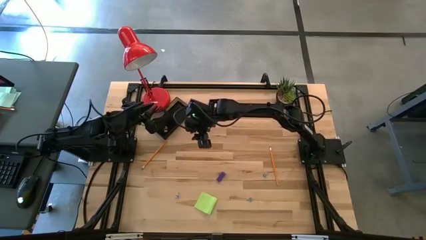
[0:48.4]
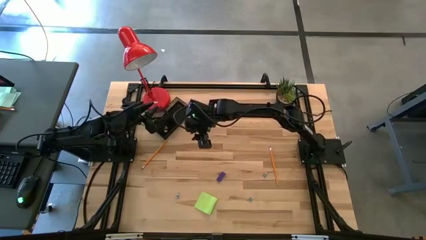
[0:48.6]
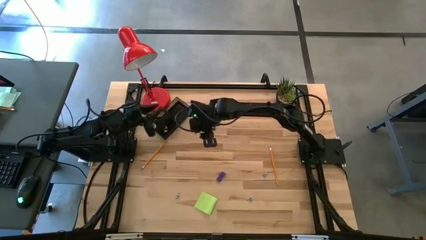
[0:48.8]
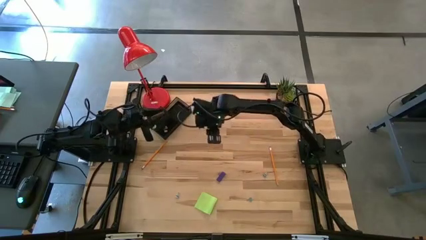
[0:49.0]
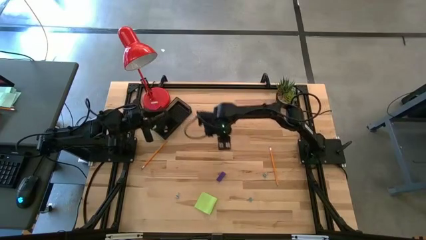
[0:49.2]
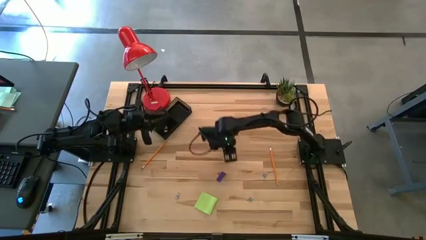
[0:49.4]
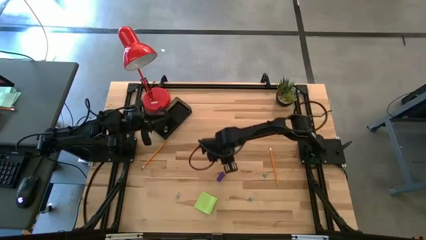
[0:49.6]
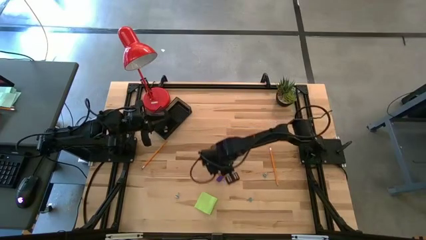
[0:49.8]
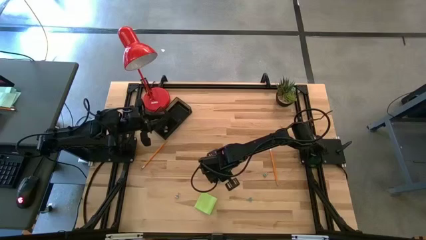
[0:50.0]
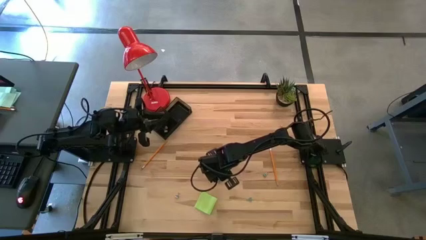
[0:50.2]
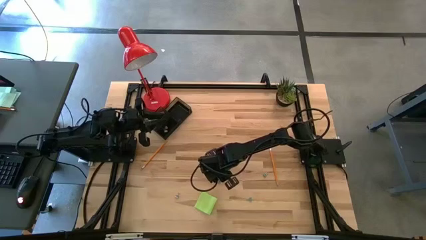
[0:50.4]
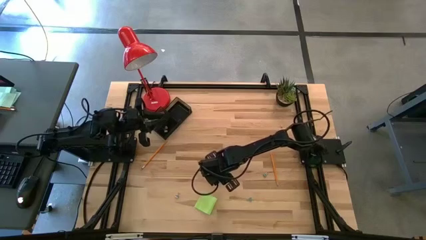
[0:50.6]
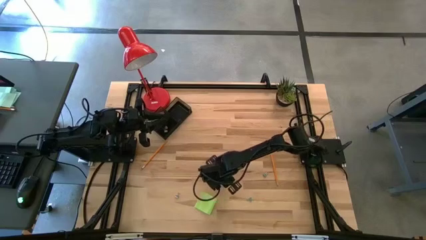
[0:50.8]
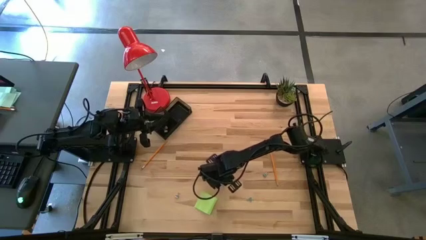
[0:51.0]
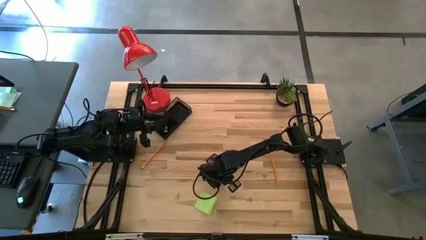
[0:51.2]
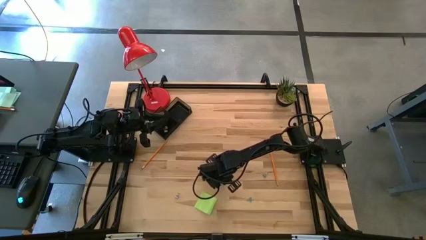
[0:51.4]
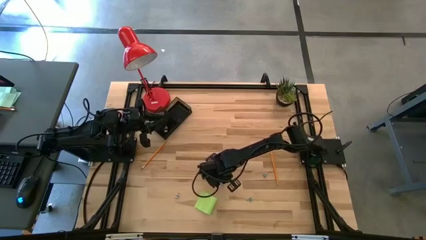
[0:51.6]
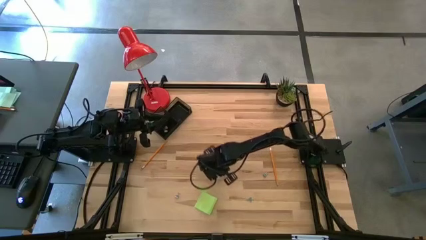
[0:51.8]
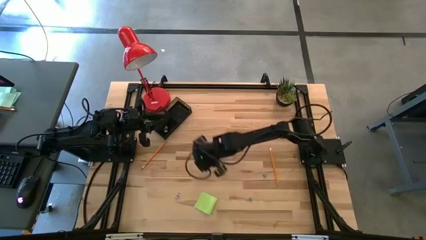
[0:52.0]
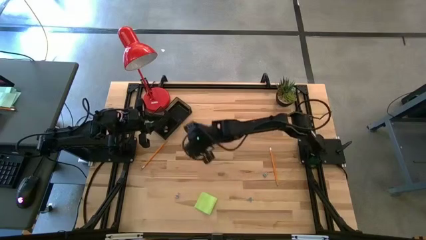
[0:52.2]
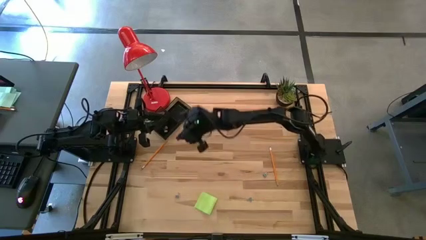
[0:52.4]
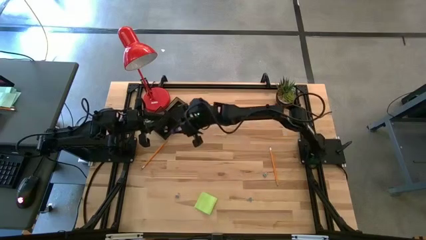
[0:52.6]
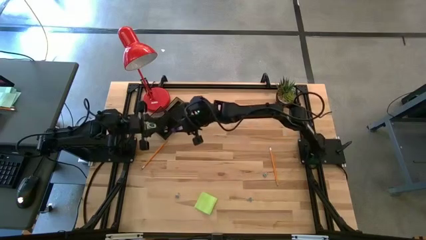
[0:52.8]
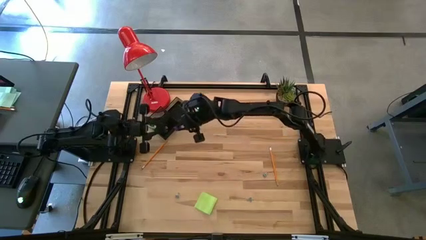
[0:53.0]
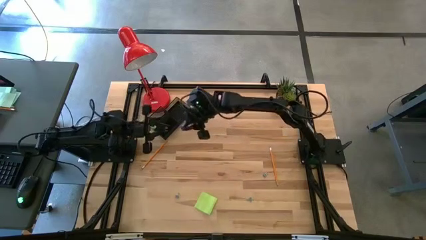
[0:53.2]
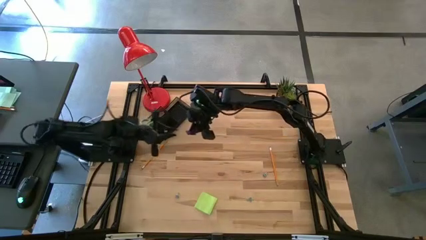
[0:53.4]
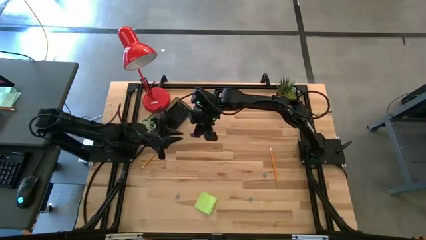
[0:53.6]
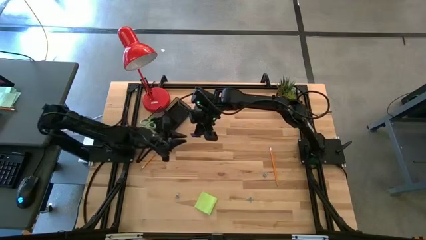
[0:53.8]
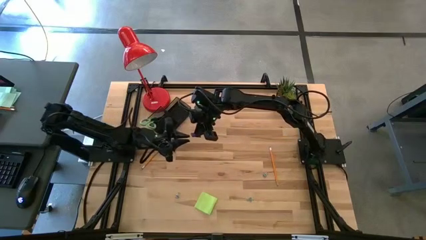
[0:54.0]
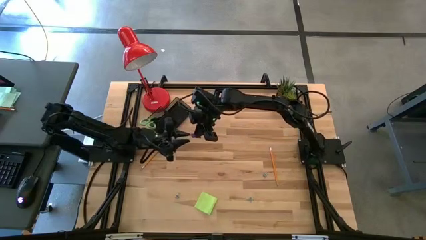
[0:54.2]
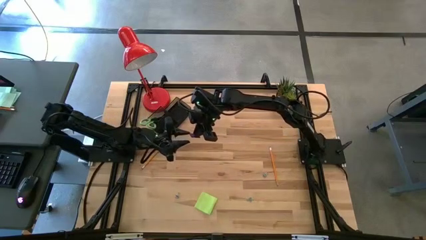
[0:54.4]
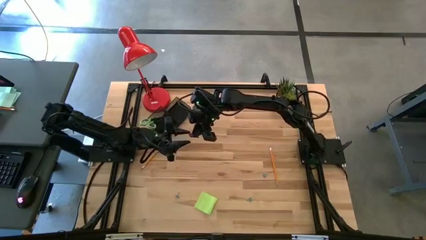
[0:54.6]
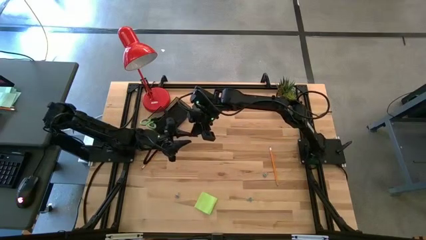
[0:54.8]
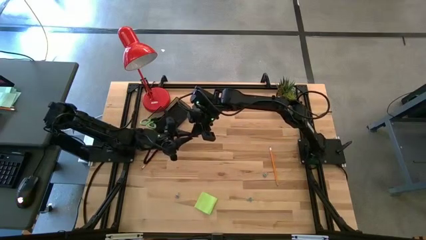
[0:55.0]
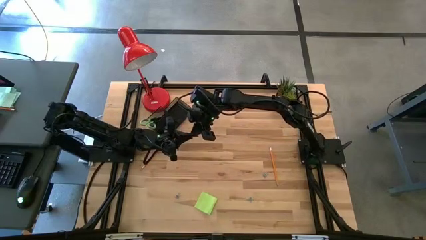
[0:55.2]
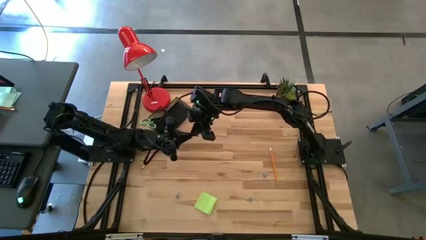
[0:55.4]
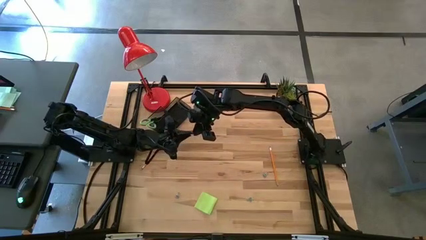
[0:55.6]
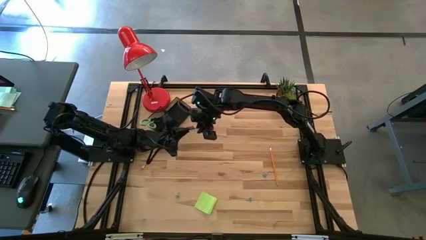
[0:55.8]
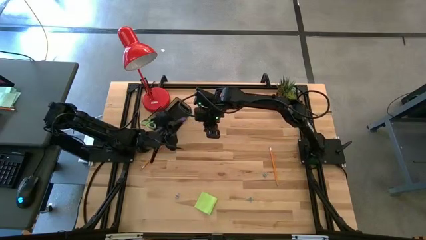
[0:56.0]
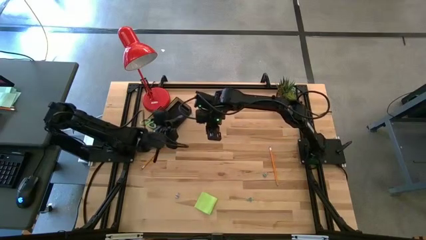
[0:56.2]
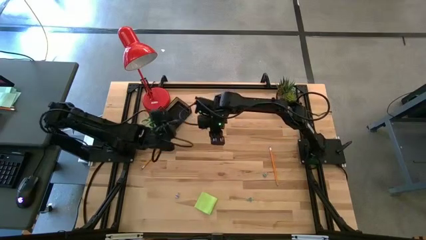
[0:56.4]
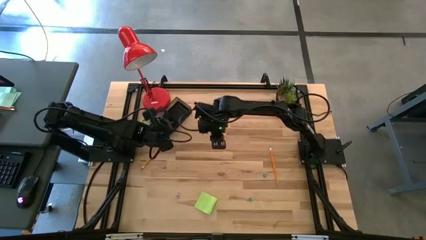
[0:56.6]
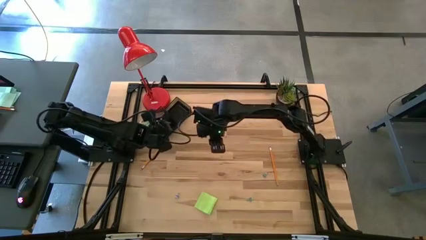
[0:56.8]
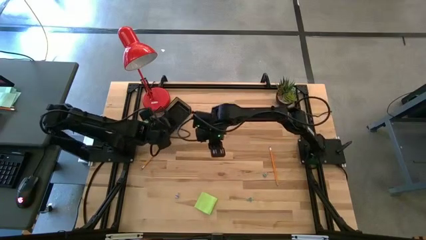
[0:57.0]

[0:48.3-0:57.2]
Task: Pick and place office supplies into organizer
Put the blue eraser into the desk organizer

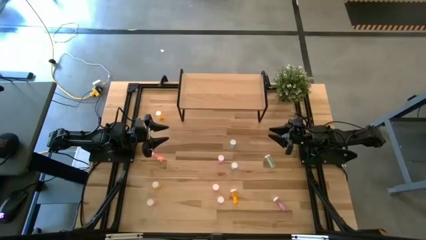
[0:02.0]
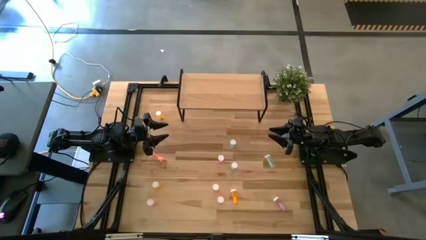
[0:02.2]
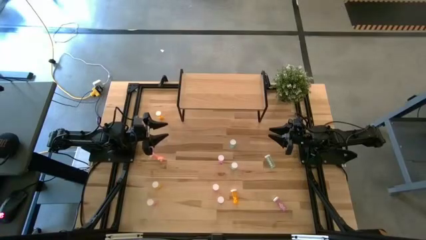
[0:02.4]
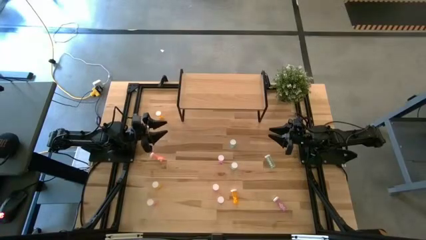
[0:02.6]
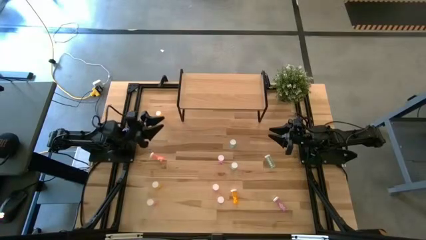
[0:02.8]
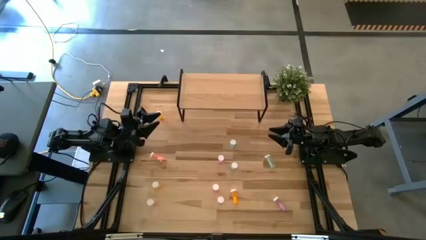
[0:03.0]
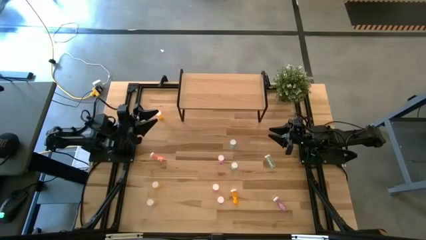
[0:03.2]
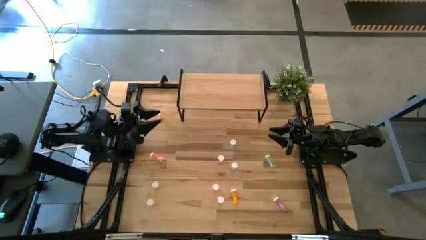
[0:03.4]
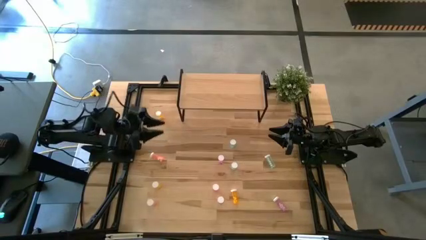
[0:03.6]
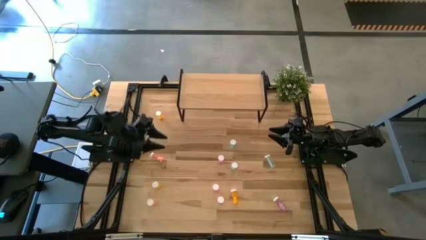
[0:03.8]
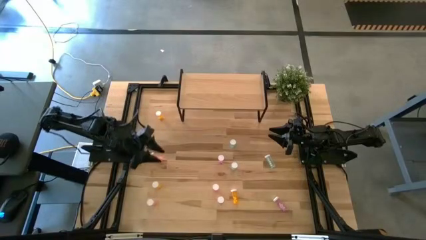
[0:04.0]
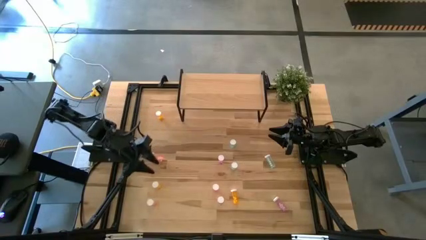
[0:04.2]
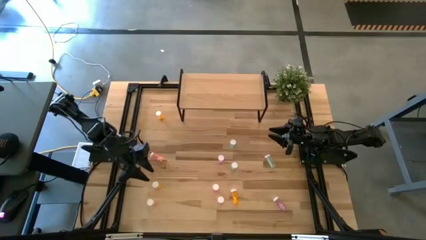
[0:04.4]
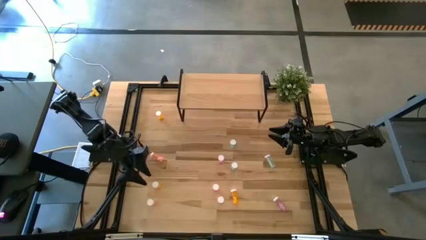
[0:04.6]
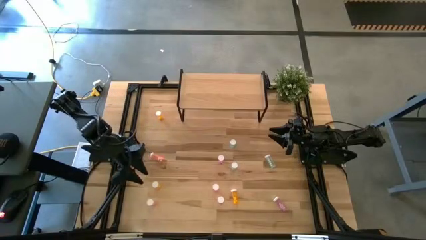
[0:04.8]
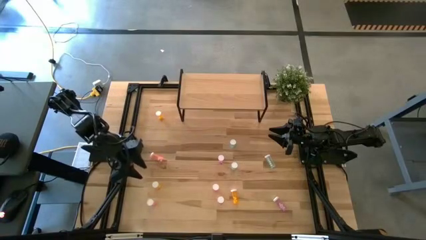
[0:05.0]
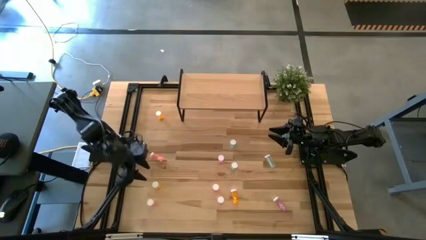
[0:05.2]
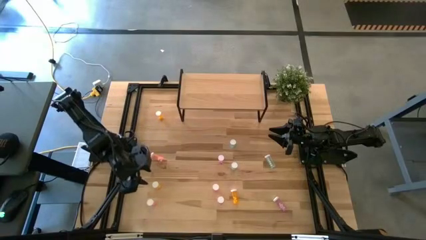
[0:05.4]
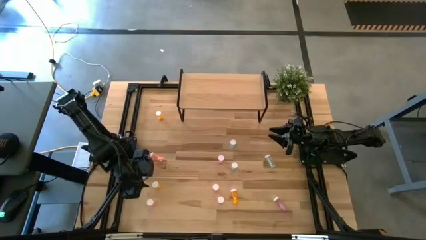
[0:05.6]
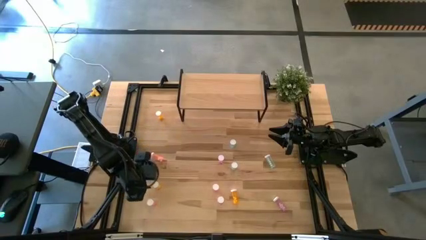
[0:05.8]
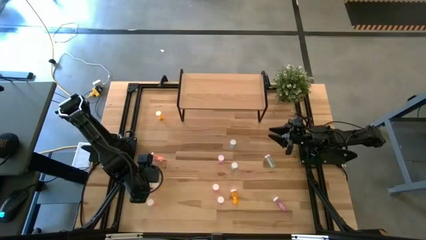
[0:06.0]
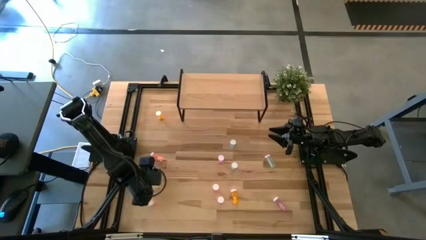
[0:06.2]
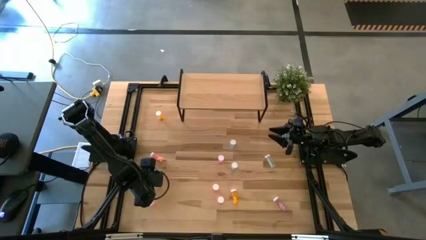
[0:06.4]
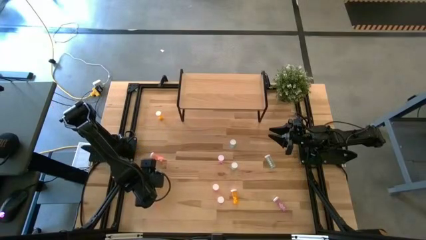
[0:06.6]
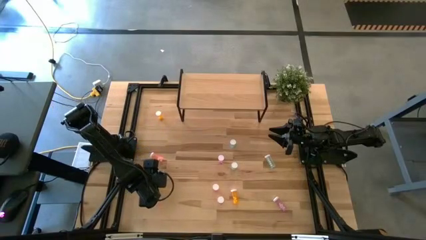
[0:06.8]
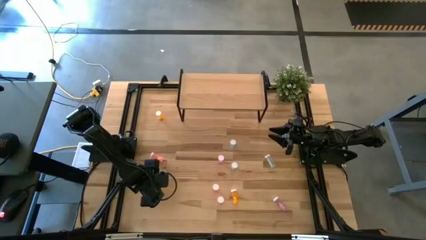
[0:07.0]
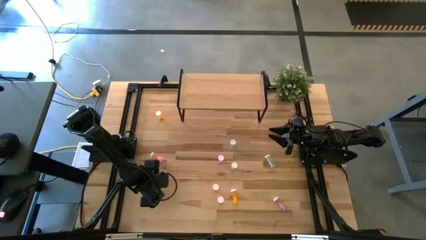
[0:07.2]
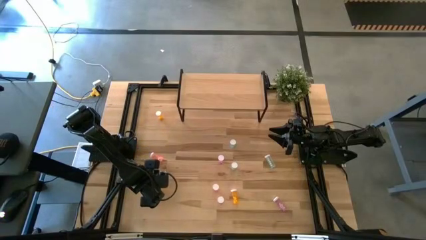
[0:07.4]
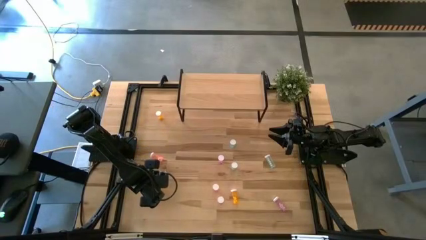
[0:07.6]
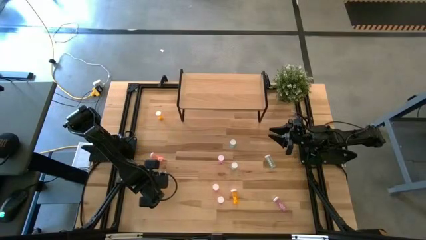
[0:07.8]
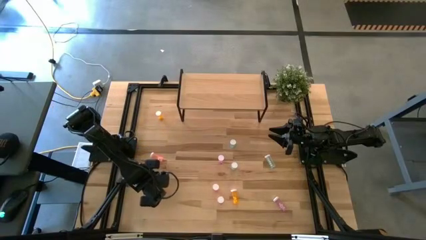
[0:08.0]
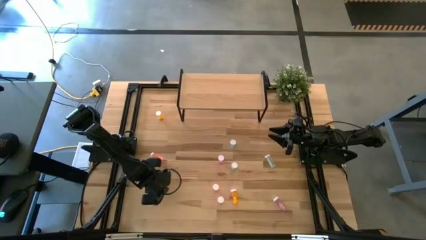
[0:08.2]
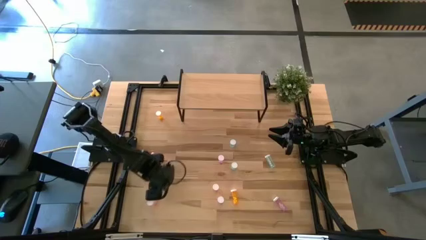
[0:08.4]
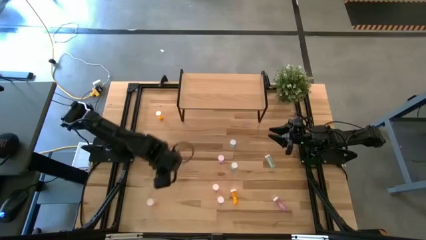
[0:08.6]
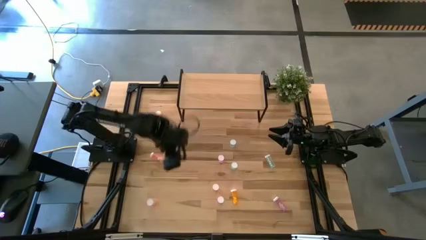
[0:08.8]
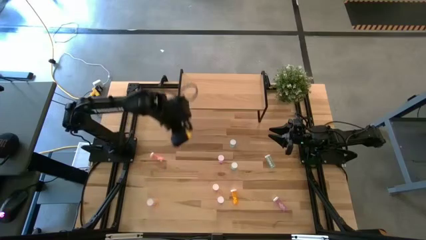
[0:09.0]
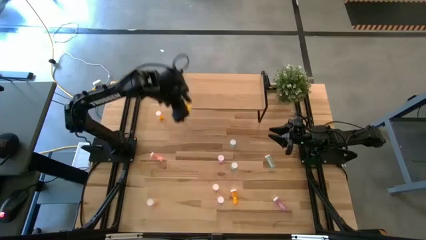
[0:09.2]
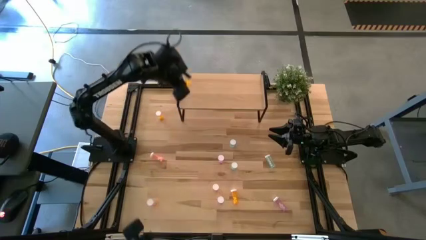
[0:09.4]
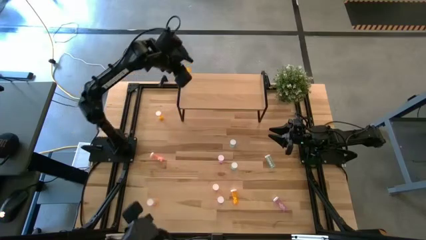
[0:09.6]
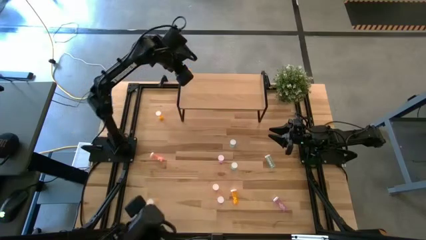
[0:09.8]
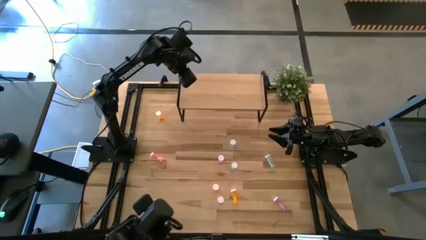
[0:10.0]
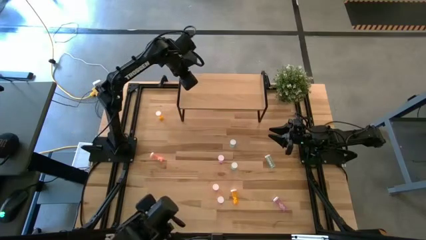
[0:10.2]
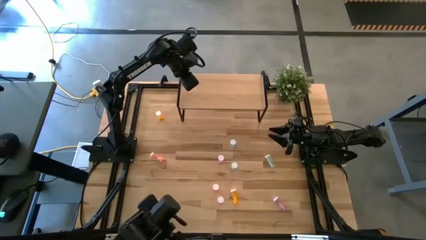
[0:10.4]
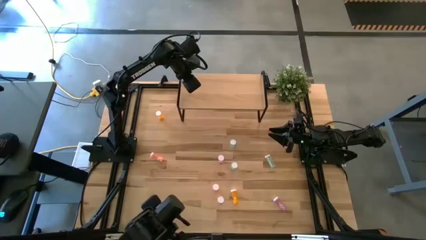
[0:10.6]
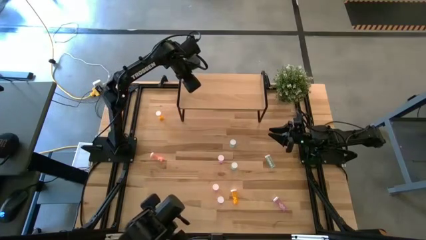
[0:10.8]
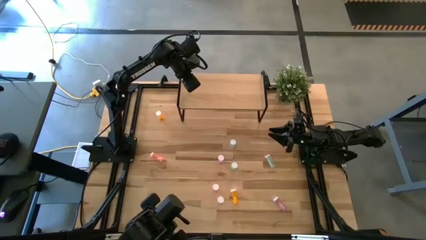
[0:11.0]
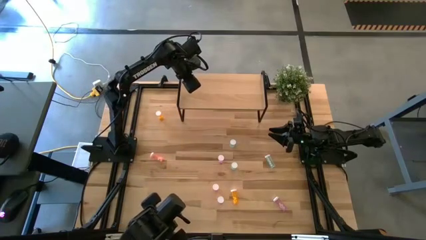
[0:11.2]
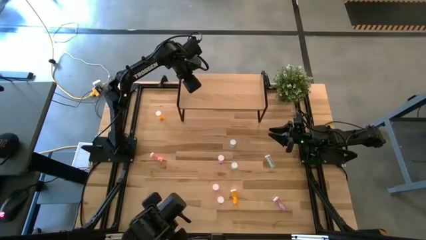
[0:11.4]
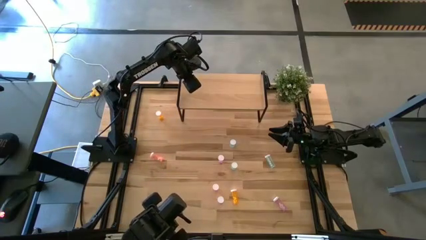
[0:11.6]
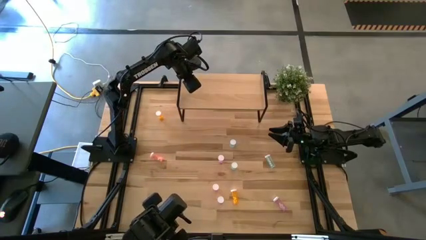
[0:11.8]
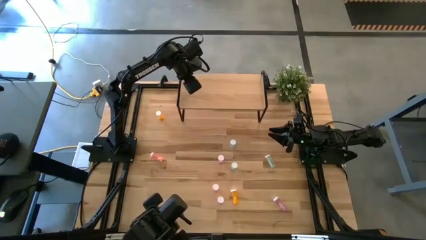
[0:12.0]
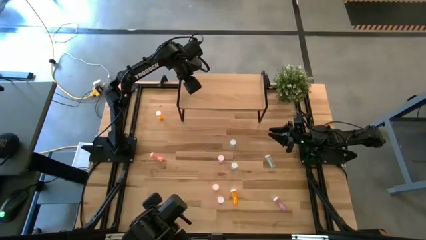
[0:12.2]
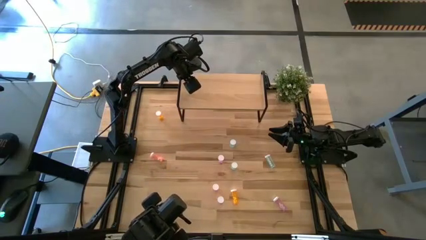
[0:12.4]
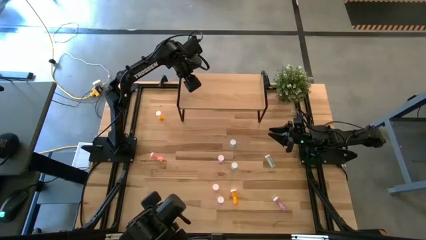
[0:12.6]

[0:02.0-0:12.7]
Task: Pick and place medicine bottles onto shelf by color
Put the bottom left orange pill bottle on the shelf
